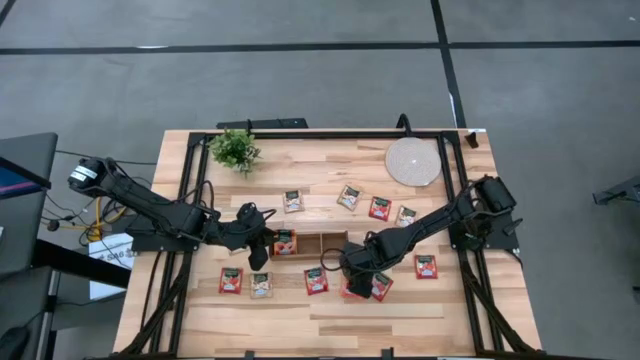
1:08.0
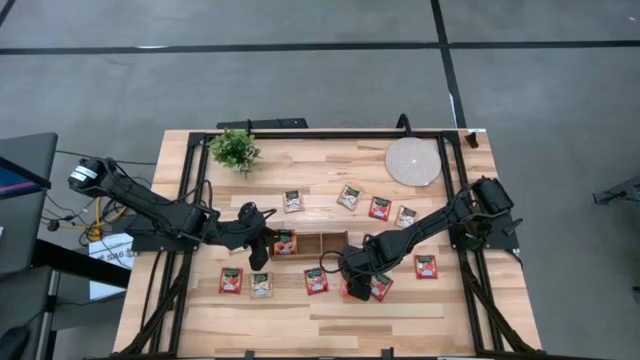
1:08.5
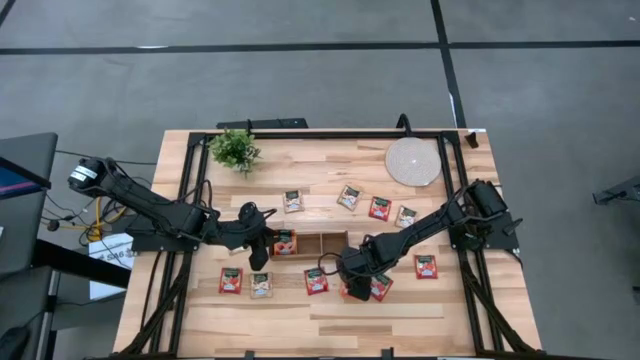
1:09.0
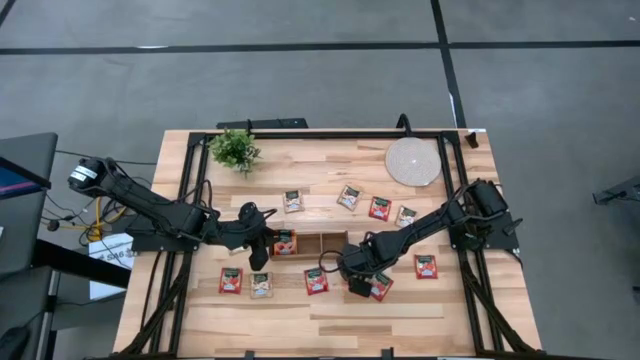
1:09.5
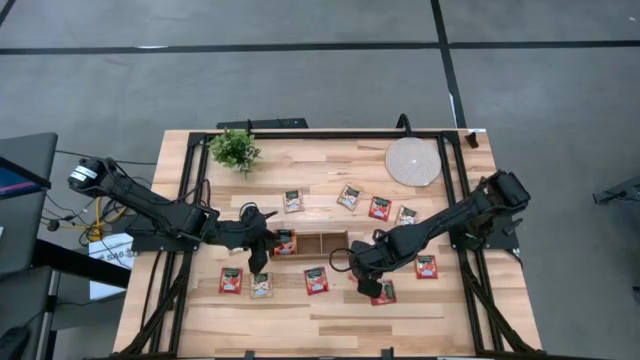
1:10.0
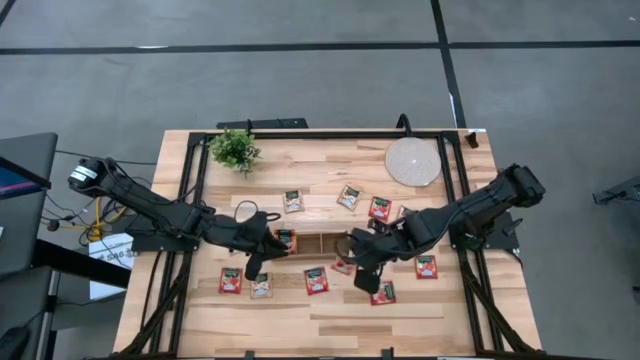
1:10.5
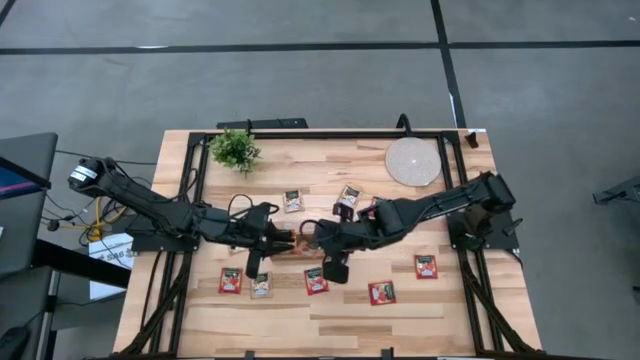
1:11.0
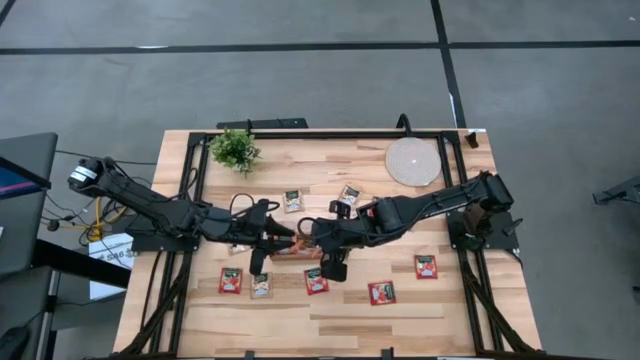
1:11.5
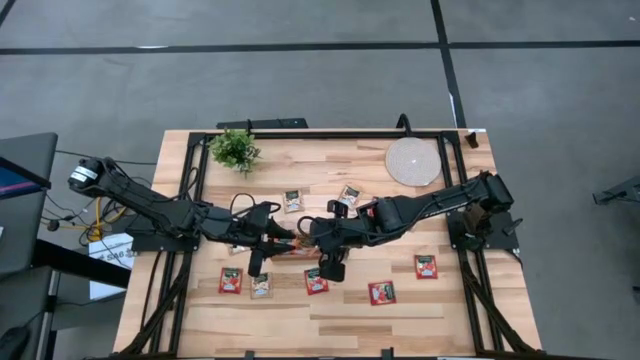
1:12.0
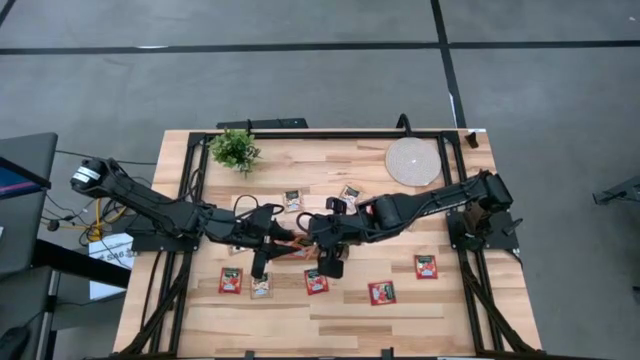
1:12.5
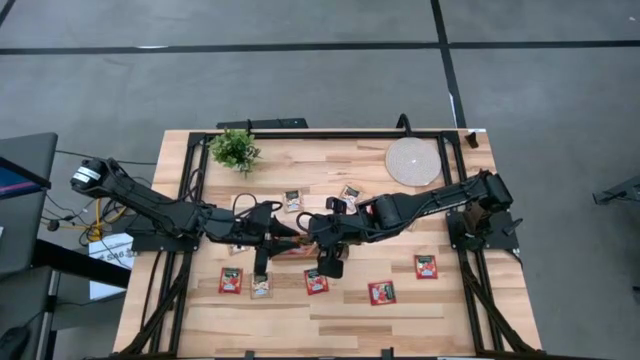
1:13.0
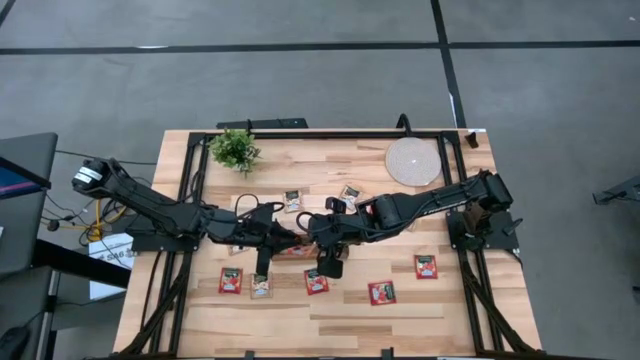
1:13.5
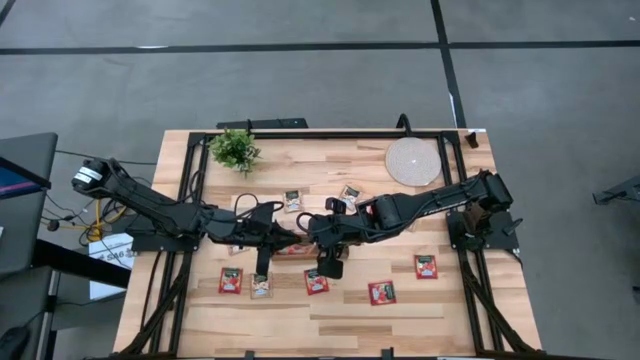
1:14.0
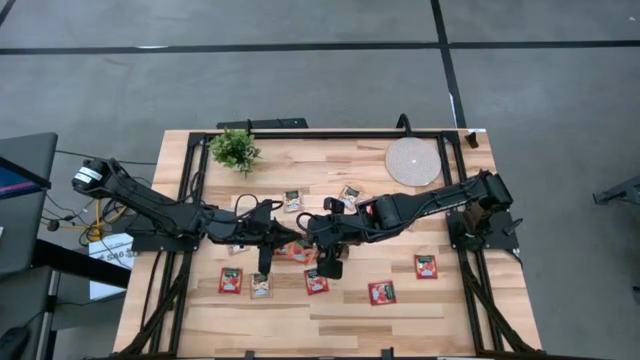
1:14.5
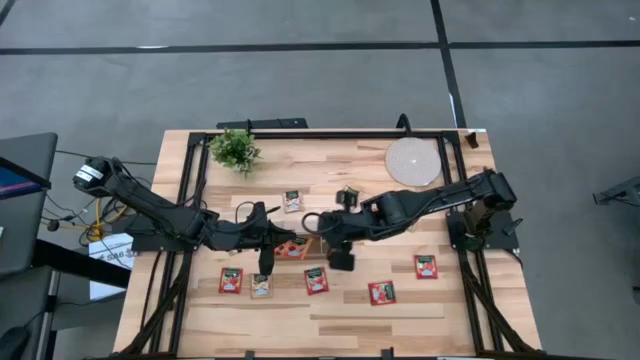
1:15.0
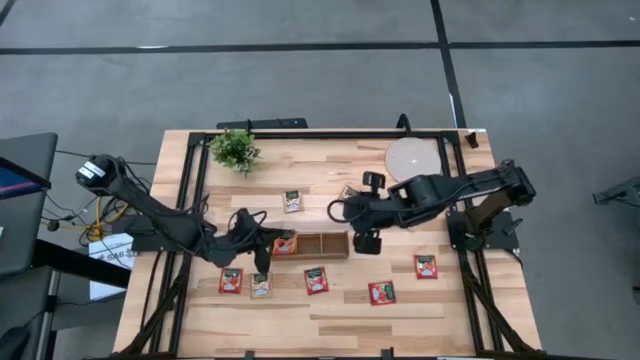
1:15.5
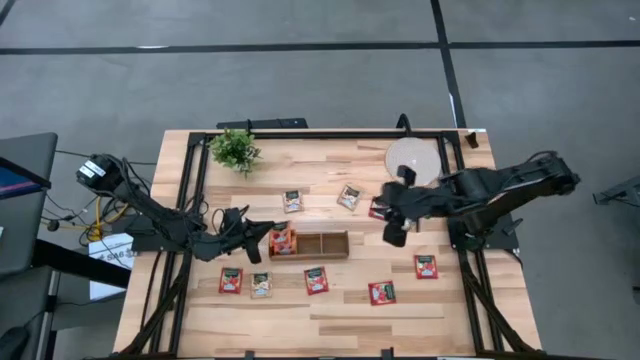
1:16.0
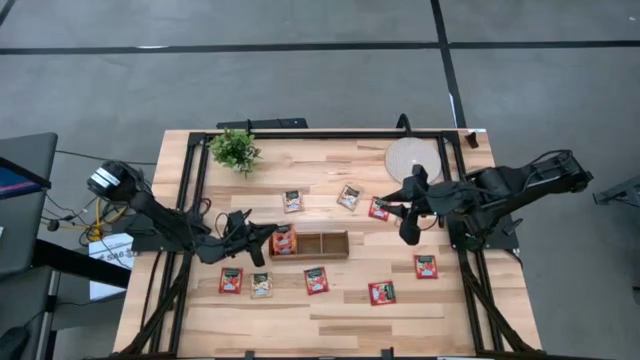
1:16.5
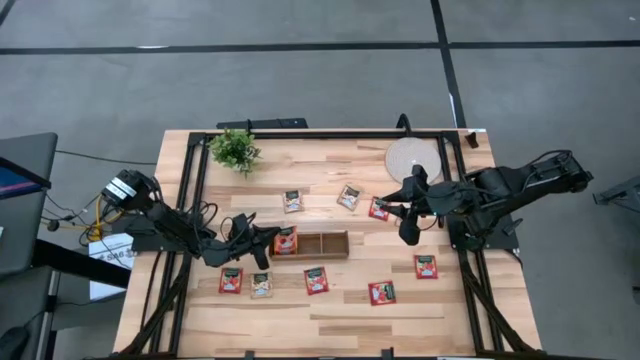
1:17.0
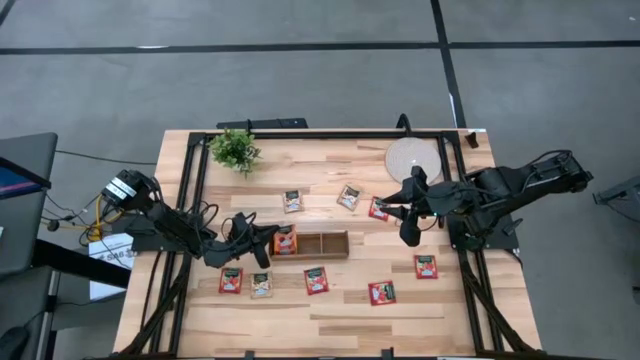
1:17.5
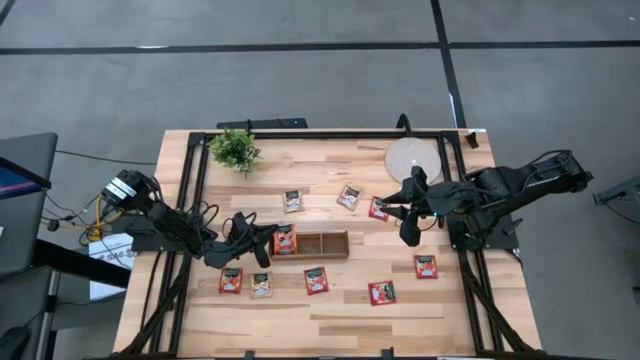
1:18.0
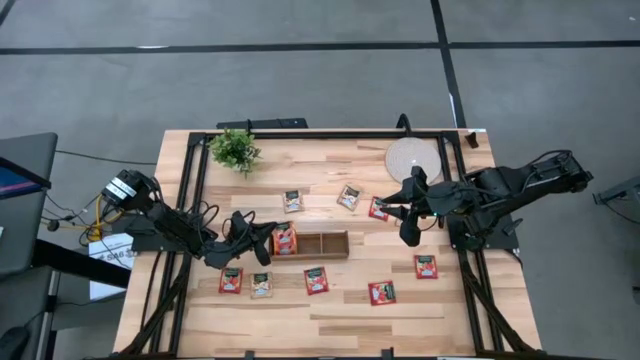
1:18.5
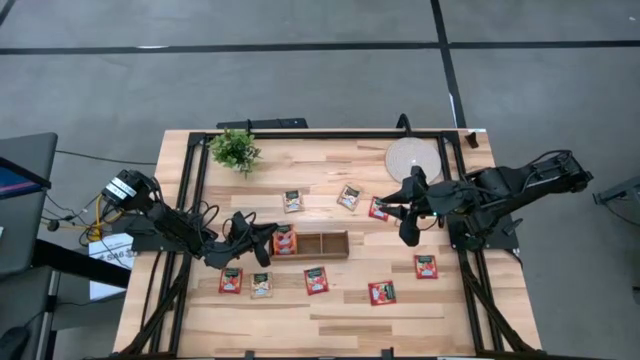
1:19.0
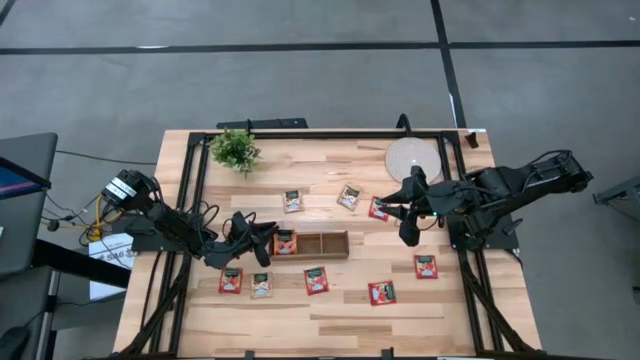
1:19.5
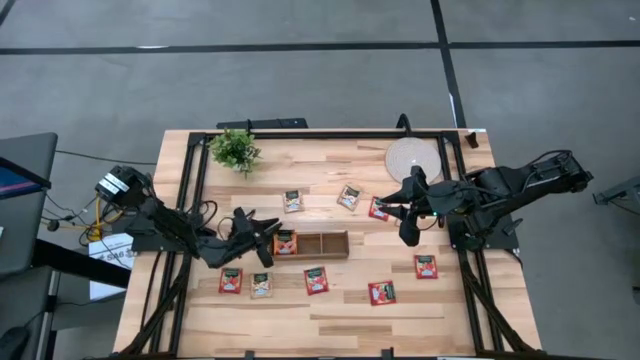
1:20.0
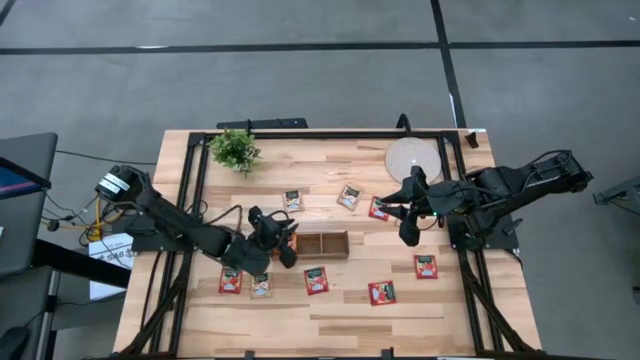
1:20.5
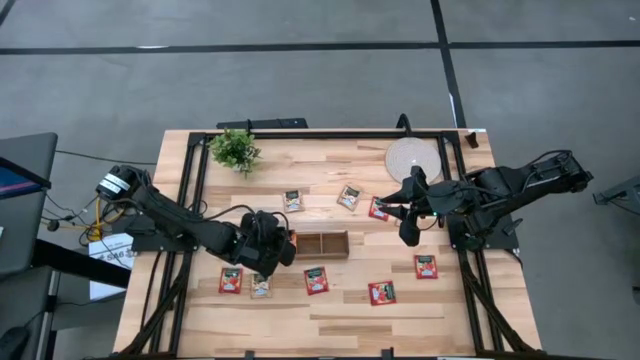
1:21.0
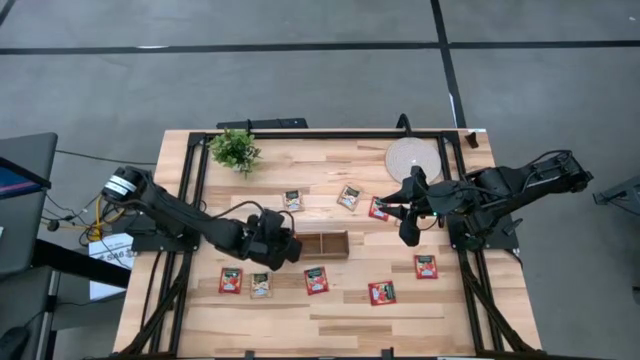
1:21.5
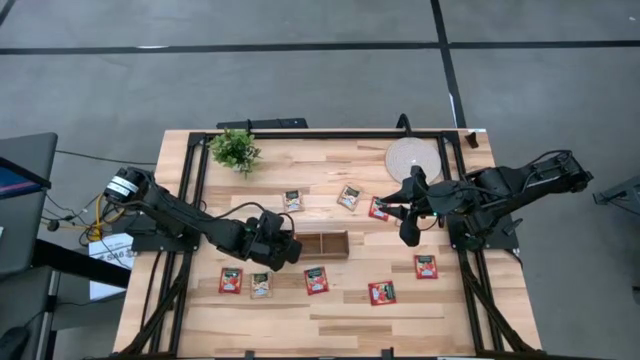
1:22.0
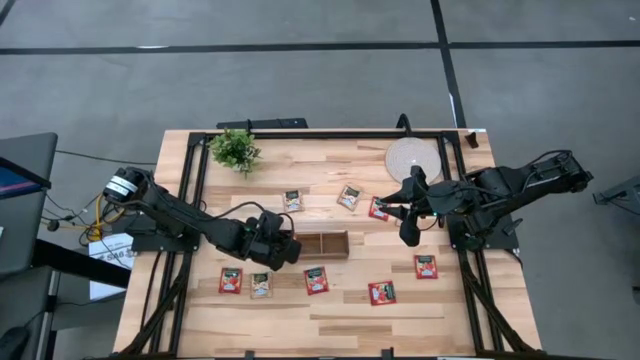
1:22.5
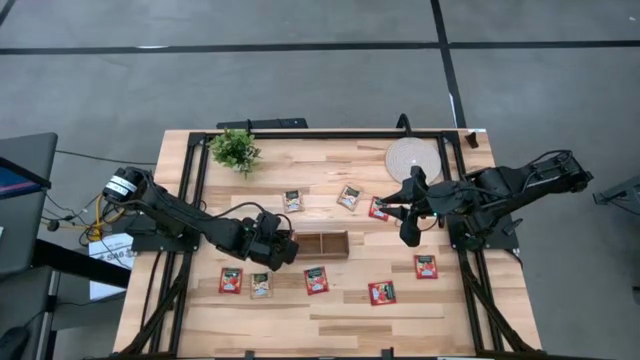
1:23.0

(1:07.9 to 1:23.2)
Task: Pick & Place Tea
Put the orange tea bag into the left section of the wooden organizer

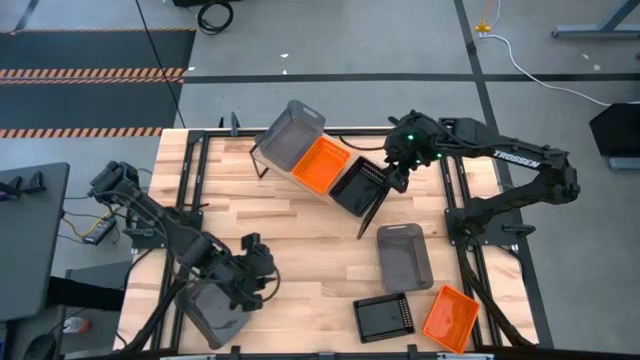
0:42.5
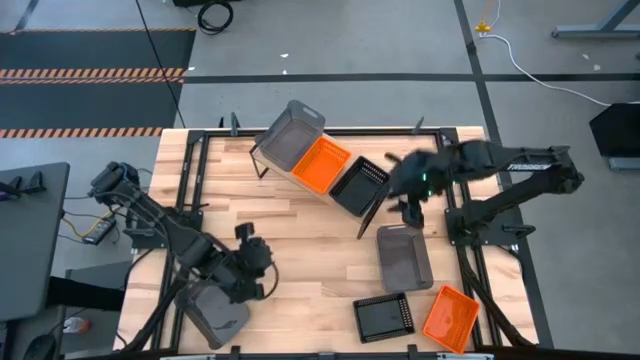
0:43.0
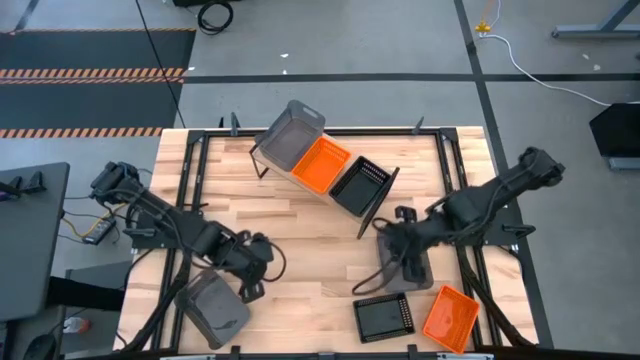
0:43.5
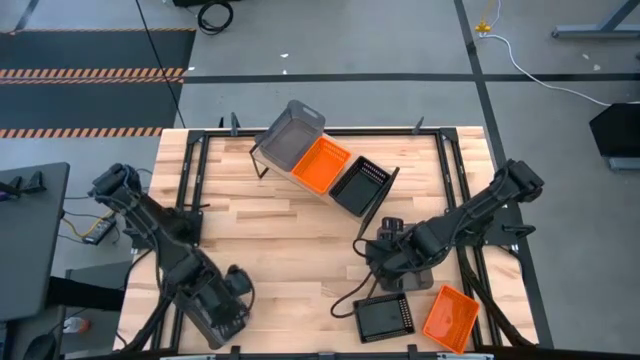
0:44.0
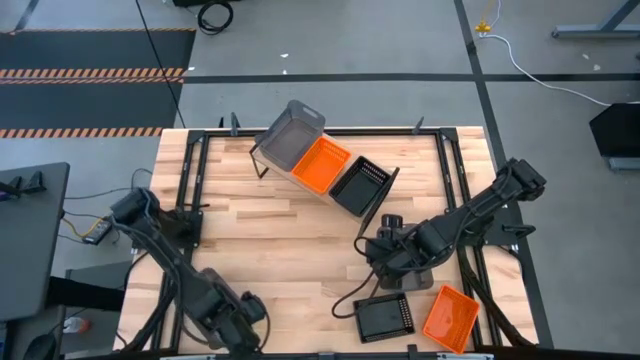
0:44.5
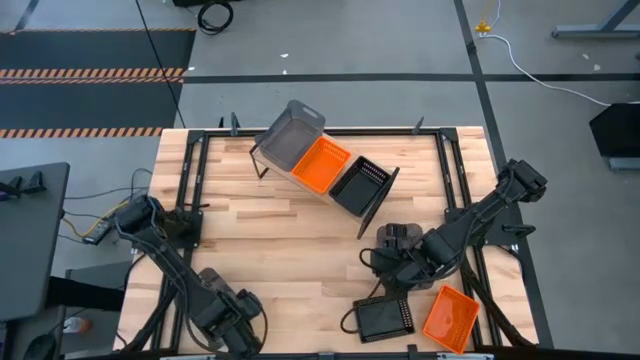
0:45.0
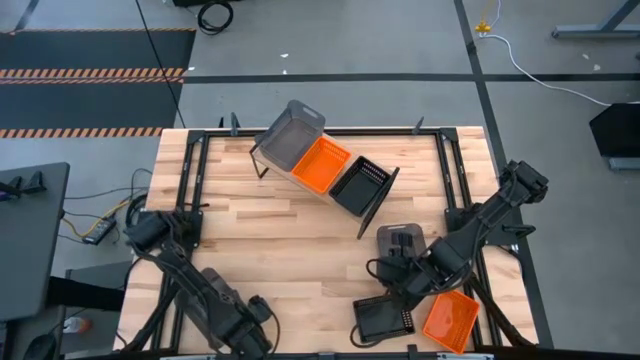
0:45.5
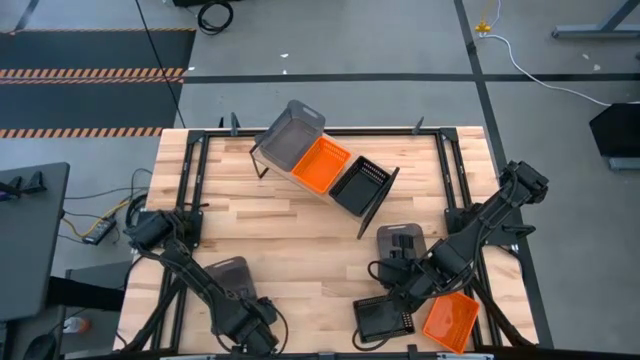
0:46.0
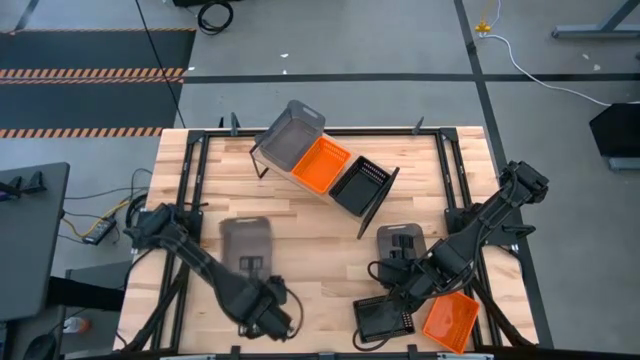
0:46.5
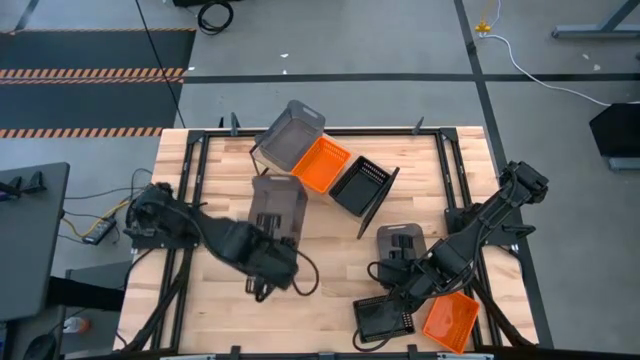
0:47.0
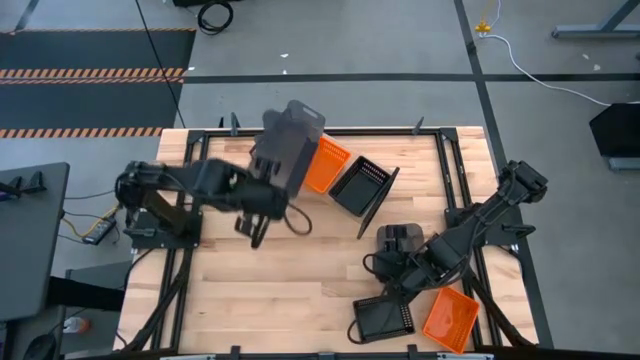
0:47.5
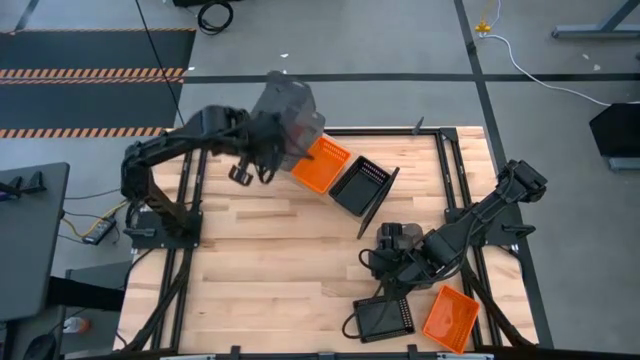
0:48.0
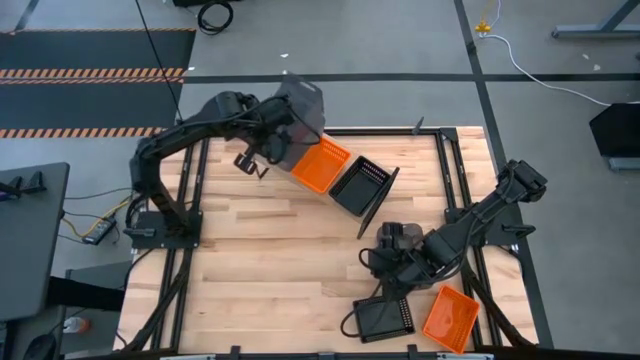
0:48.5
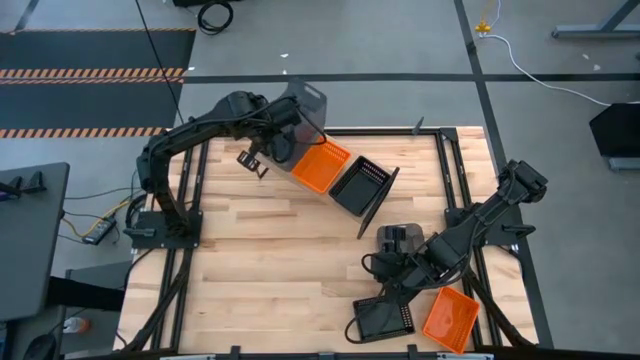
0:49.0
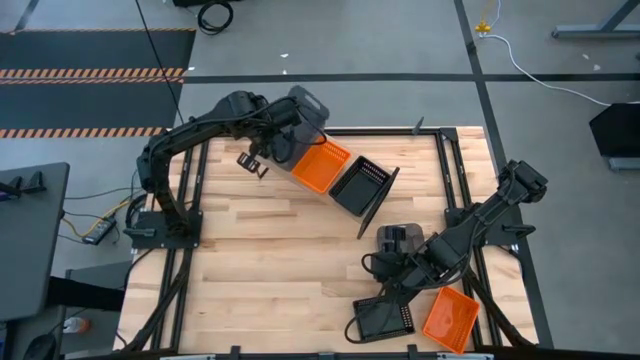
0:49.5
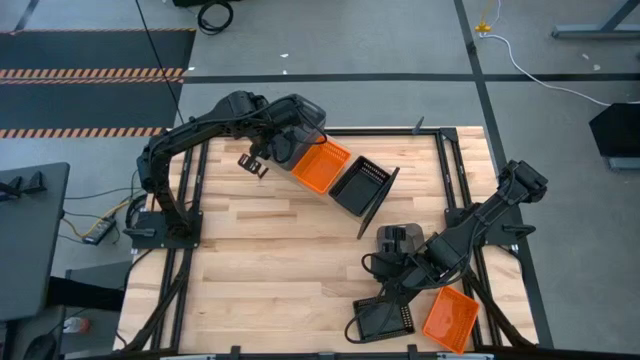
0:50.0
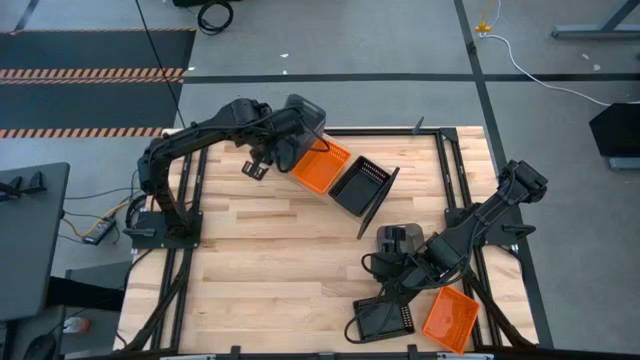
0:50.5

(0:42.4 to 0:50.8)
Task: Stack baskets on shelf by color
Stack the bottom black bin on top of the other black bin on the shelf
